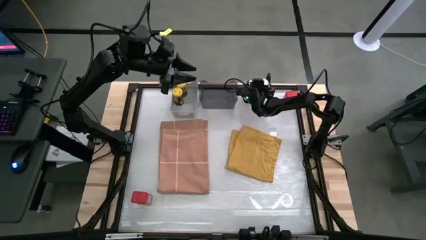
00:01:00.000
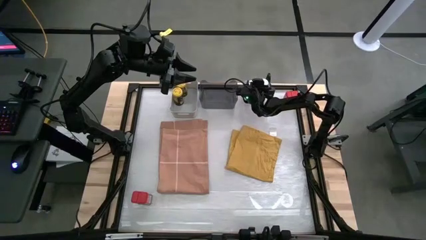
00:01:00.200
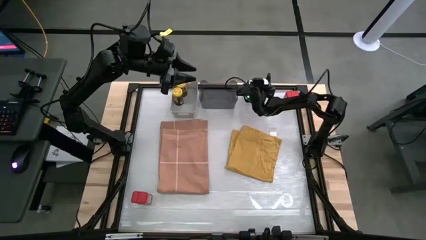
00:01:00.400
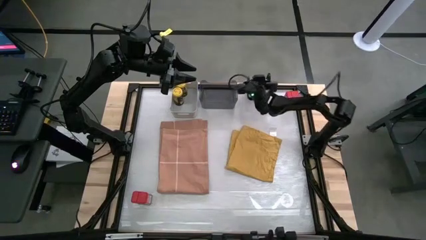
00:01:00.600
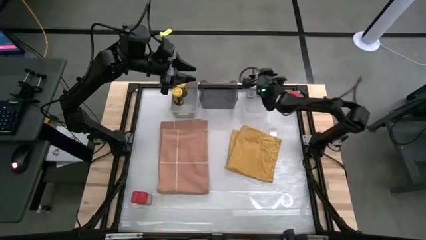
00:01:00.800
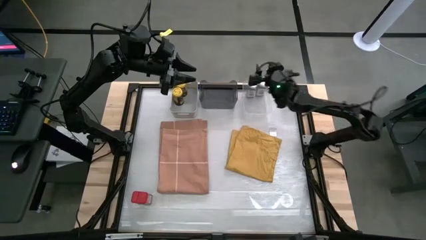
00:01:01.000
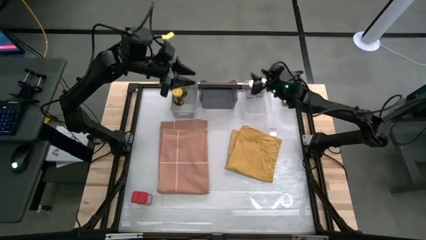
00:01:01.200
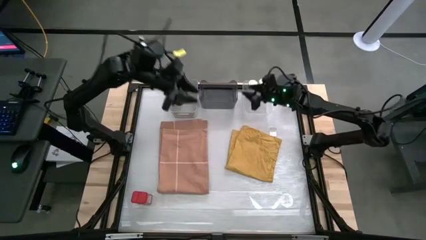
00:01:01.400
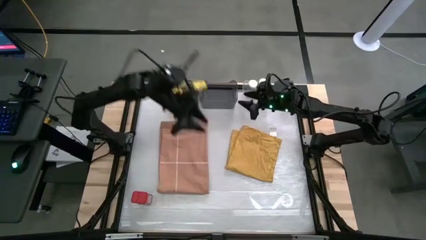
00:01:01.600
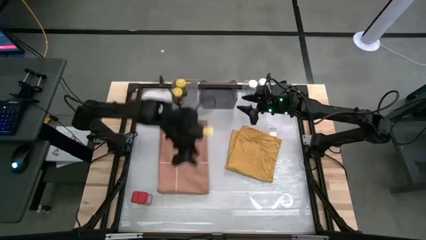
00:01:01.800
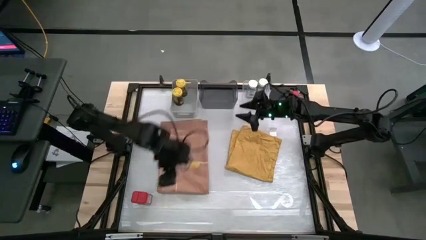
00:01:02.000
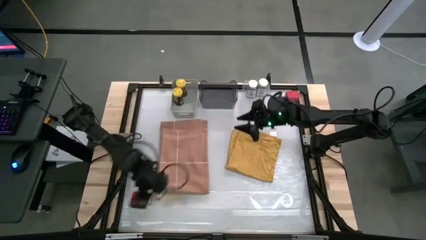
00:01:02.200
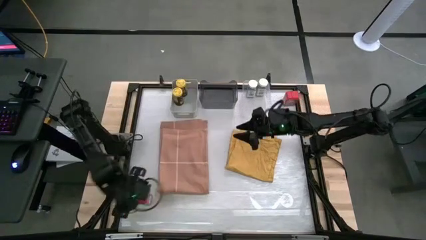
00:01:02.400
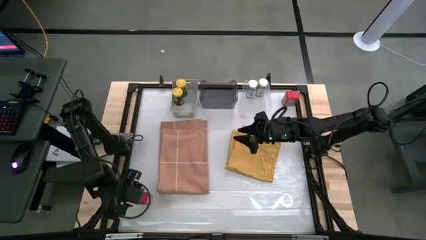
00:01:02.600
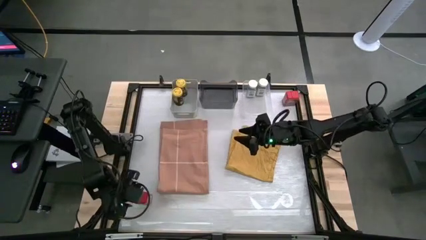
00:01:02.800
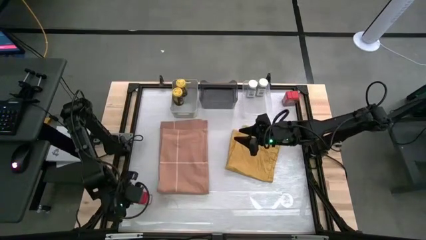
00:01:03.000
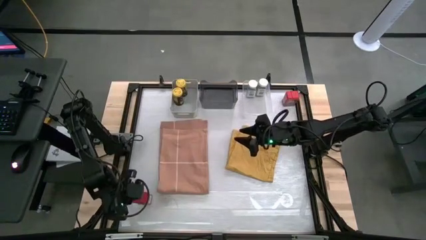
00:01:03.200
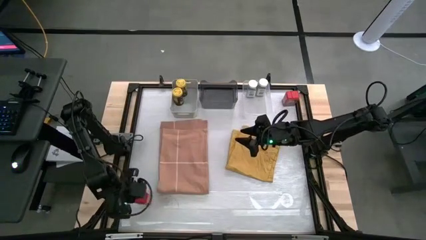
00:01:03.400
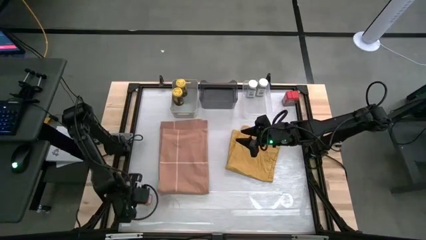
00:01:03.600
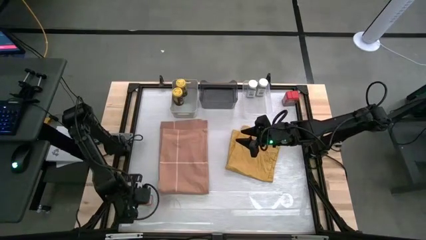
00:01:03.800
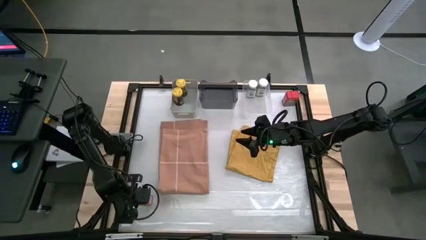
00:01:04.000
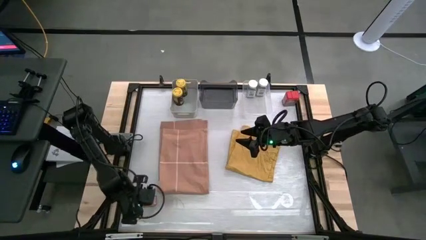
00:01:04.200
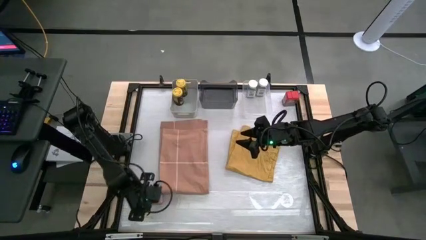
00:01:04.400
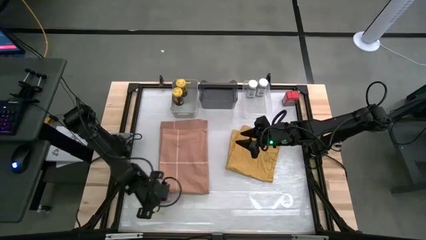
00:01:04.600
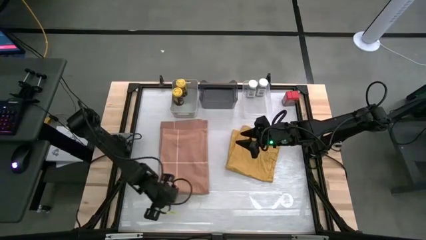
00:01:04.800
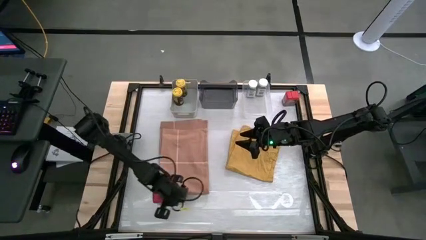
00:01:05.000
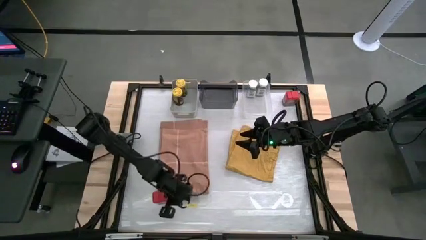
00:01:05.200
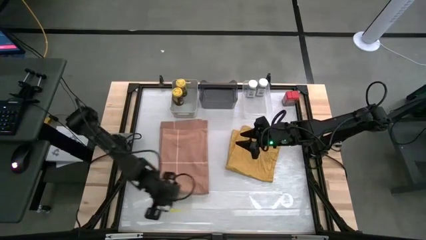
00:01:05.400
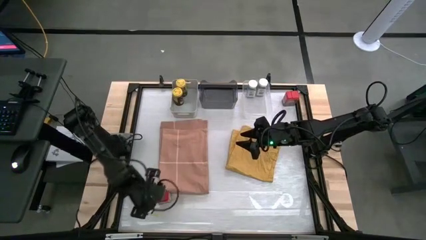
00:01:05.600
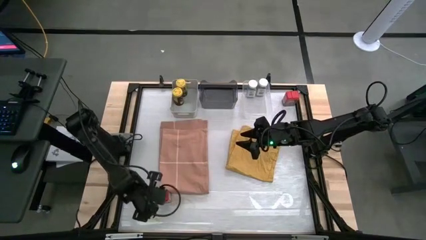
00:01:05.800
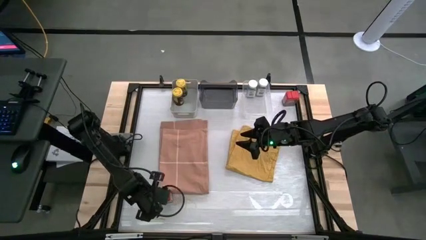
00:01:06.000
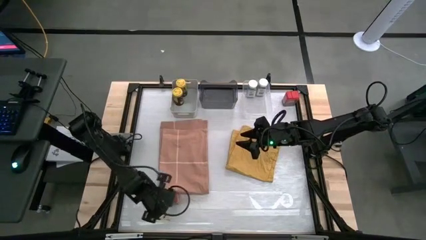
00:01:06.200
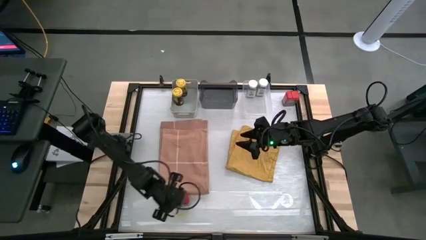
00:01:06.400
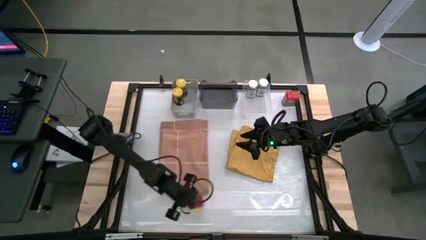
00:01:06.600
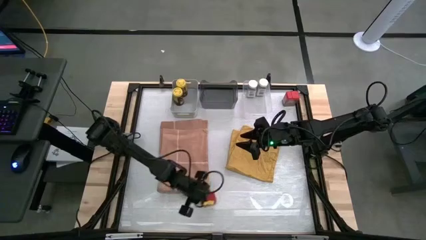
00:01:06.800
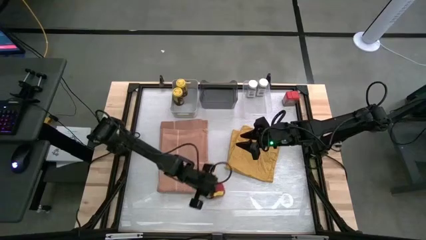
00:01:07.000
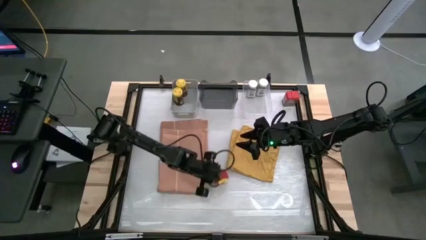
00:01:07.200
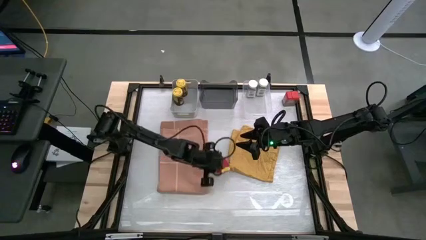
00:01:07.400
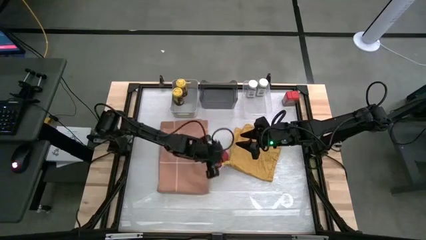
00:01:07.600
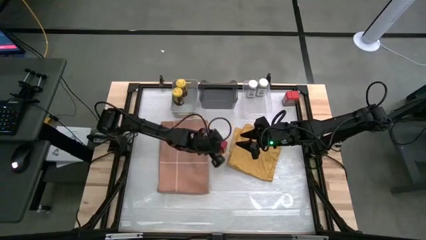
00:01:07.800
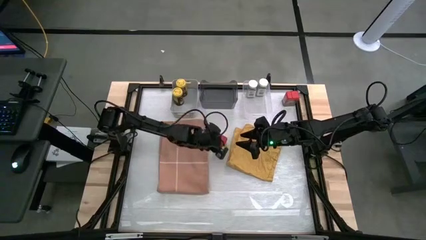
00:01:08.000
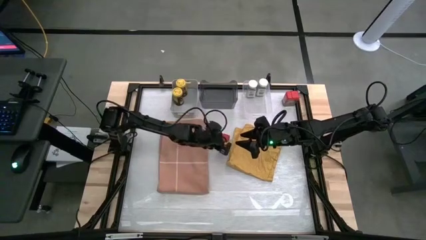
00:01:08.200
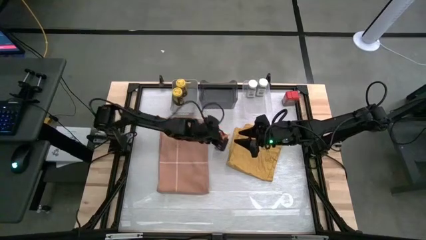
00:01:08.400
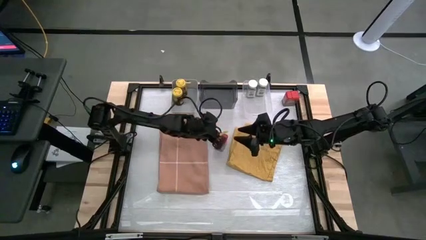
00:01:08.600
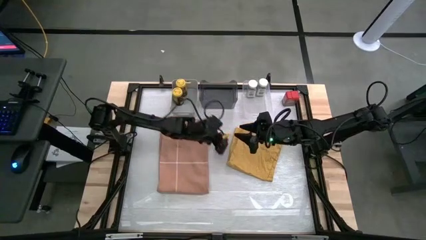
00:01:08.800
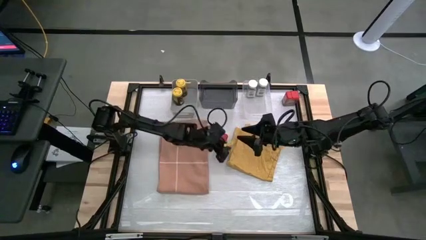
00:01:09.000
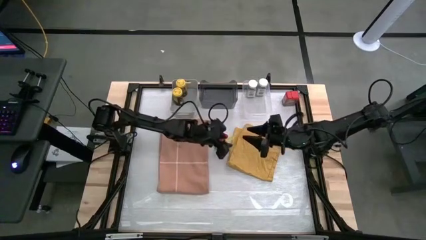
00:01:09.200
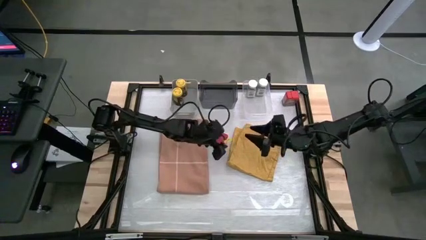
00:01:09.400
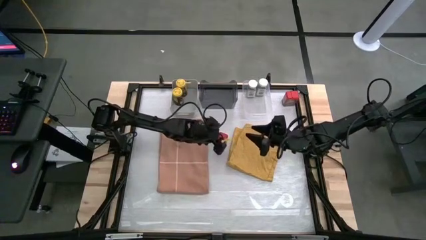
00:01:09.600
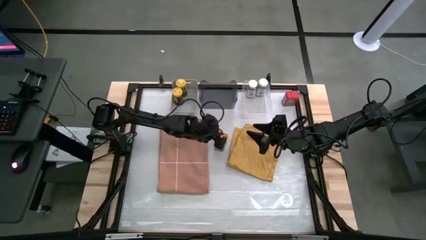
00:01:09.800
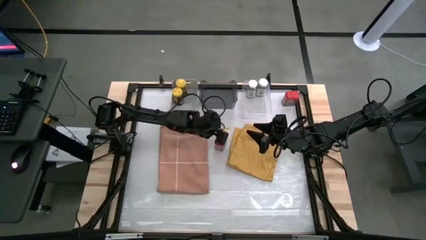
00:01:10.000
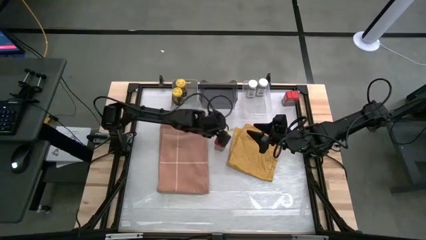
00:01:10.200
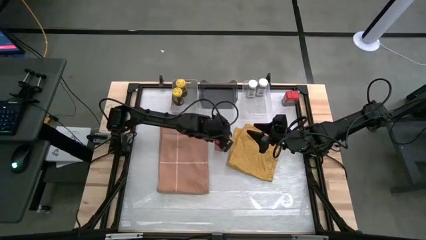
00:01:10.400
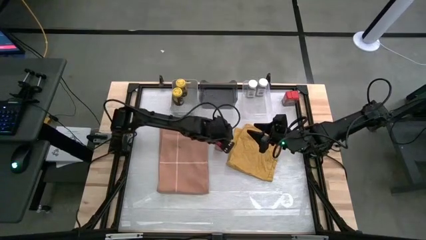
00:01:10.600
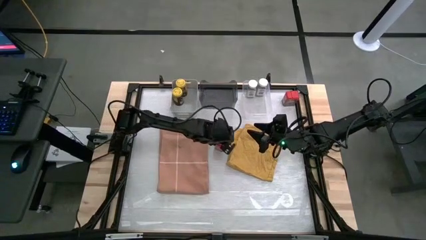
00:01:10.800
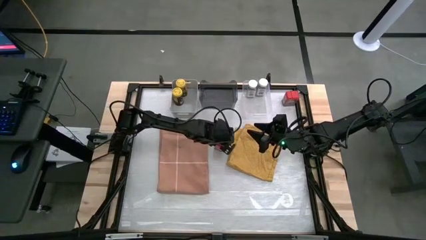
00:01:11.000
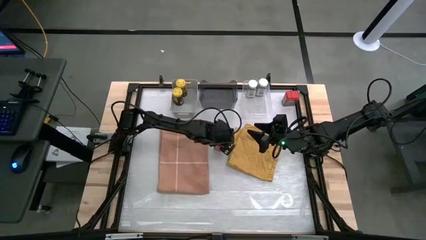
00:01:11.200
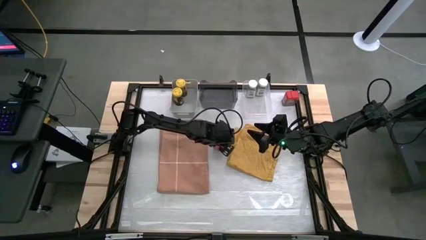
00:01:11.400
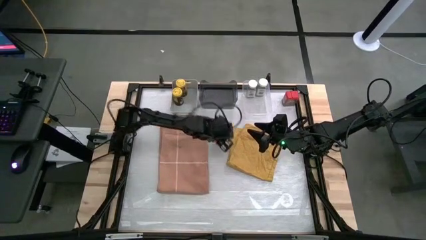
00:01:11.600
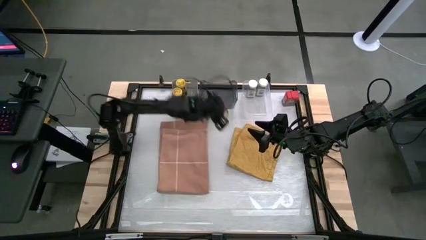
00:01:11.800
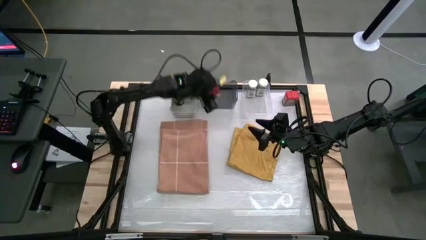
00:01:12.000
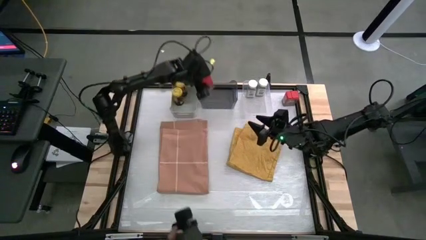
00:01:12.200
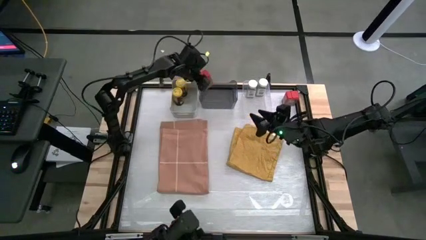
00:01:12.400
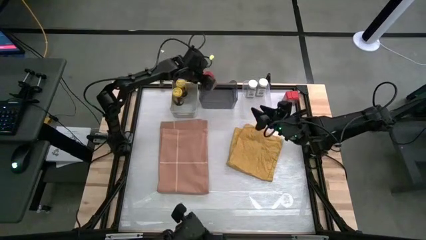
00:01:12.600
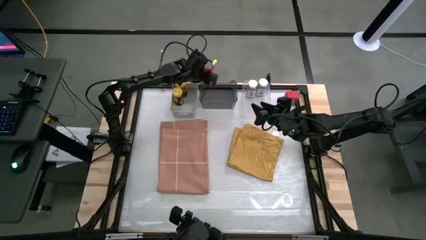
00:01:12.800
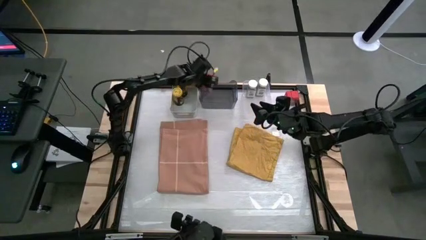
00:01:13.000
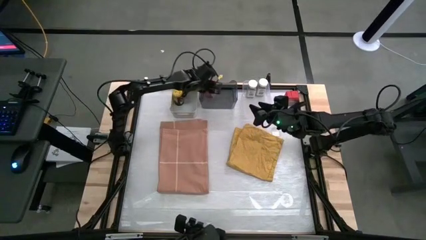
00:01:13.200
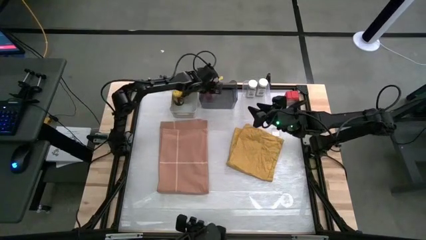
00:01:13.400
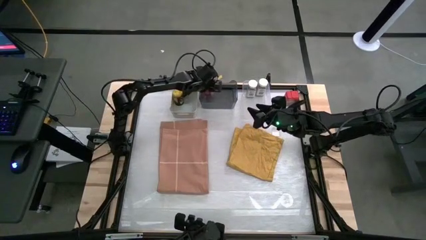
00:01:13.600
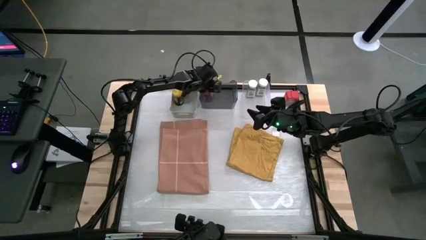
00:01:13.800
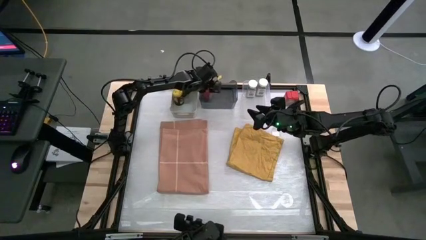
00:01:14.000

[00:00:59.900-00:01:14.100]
Task: Sort spices by type
Put the bottom red seasoning can into the black bin

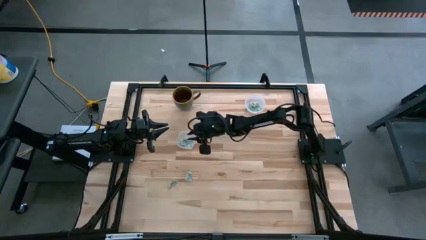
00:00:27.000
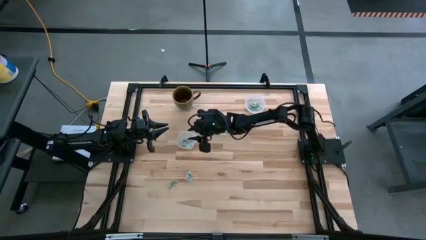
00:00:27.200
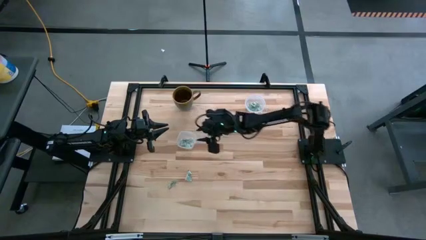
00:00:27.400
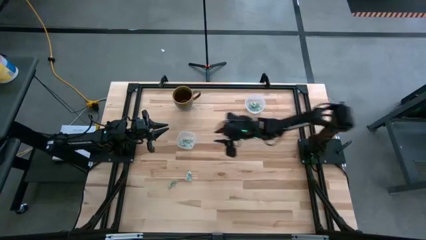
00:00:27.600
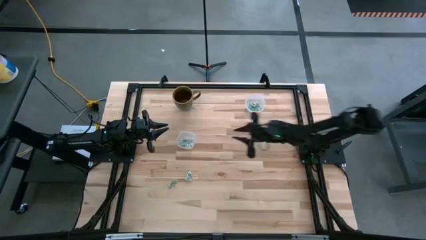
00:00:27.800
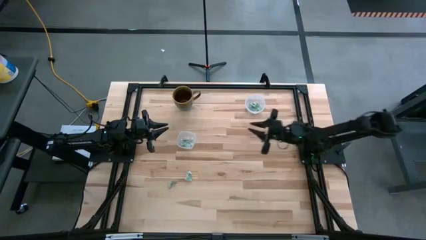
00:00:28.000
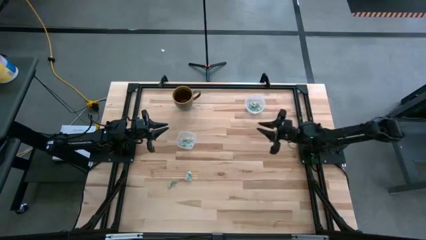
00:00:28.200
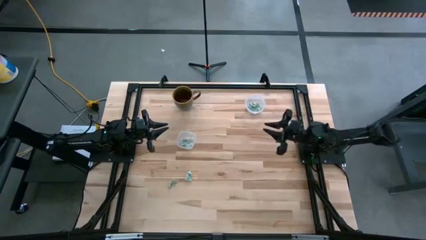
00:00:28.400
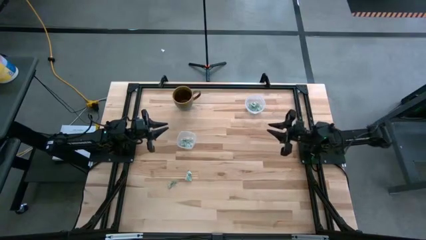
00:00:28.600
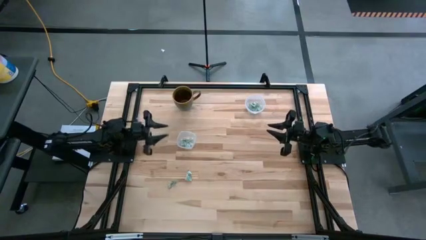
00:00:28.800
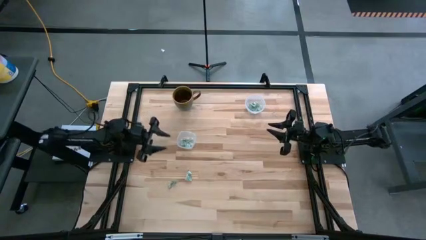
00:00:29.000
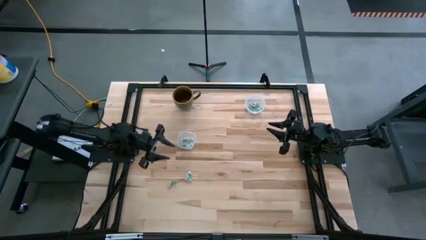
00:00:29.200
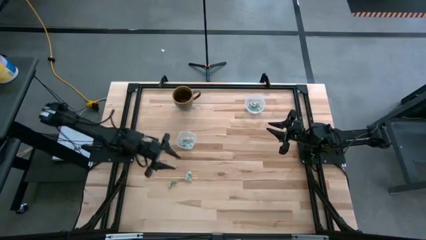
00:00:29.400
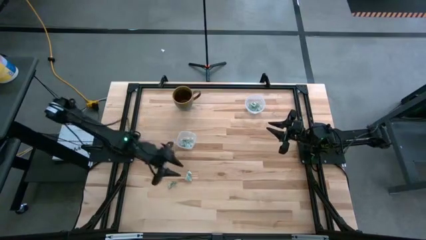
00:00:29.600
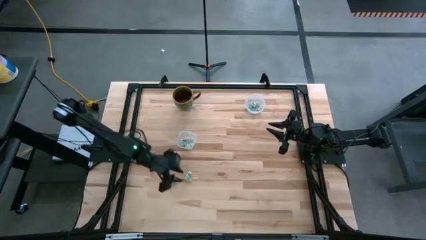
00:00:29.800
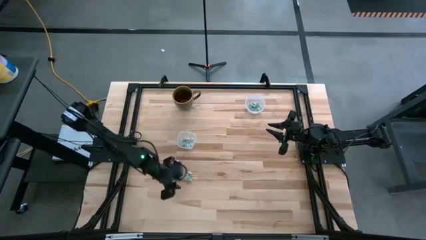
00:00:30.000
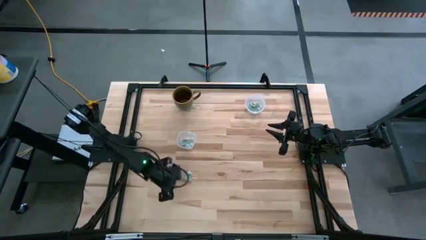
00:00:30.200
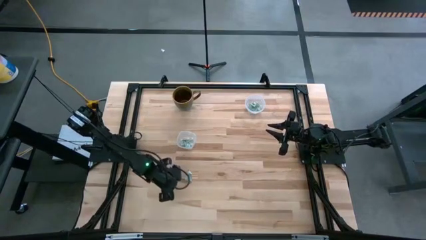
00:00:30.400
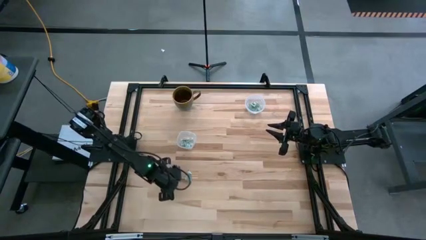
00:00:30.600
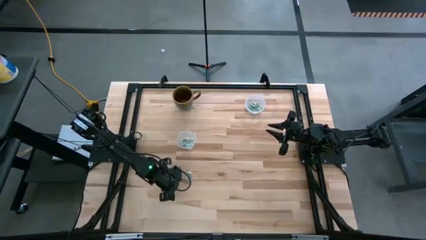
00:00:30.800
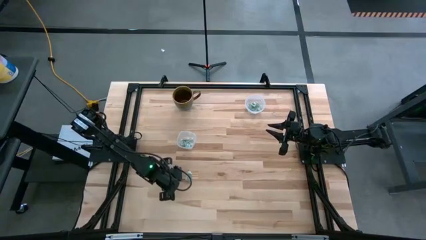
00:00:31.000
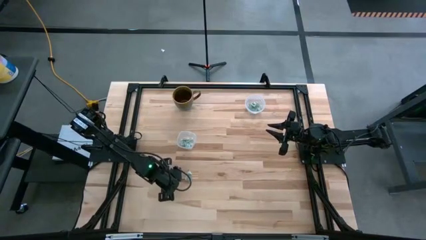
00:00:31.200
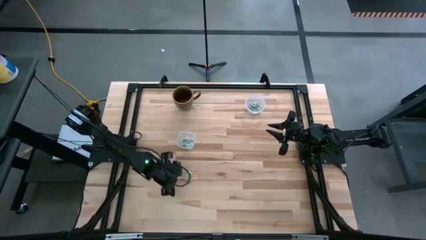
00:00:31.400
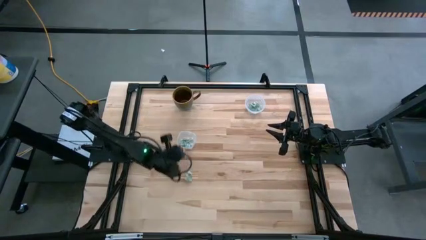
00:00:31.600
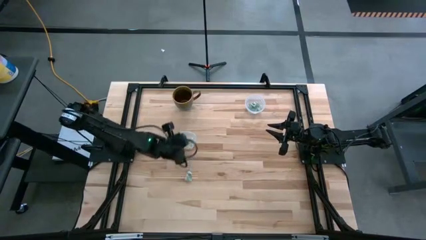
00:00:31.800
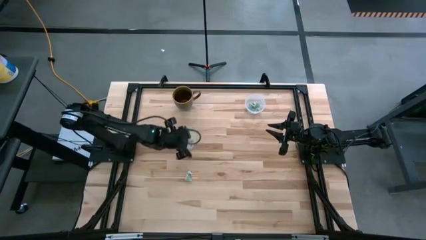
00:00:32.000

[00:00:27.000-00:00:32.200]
Task: Pick and place Stevia / Truvia into bins
Put the stevia packet into the bottom container
